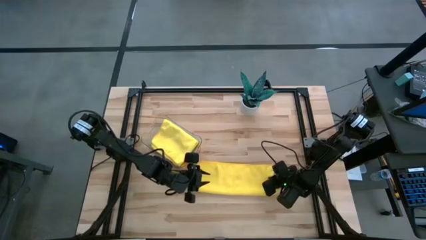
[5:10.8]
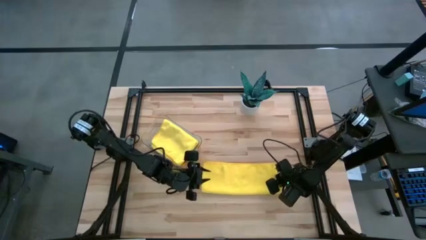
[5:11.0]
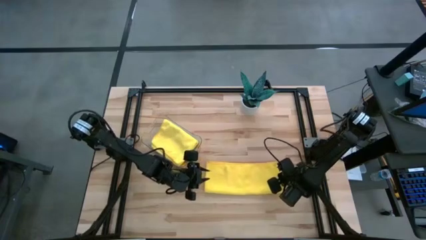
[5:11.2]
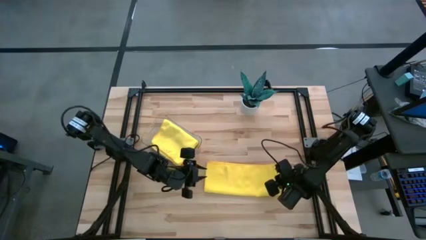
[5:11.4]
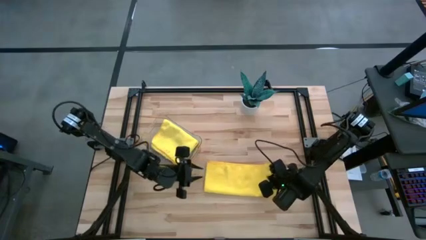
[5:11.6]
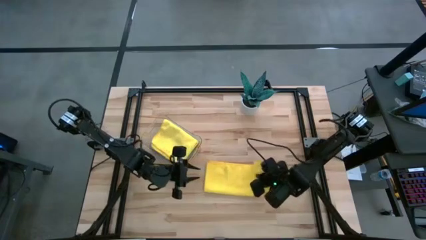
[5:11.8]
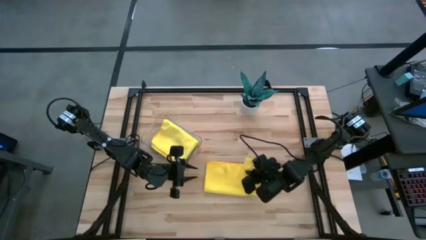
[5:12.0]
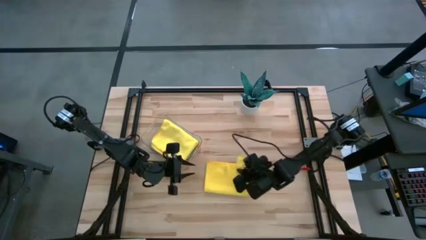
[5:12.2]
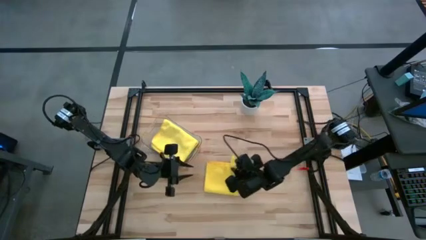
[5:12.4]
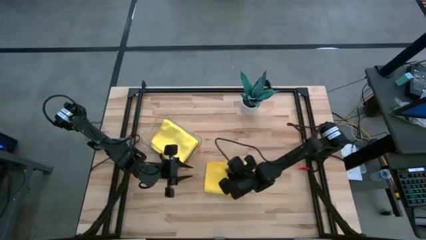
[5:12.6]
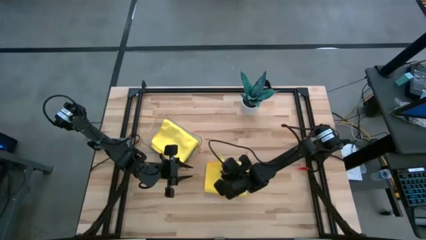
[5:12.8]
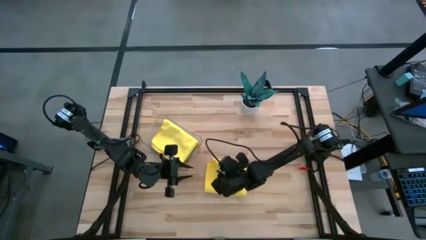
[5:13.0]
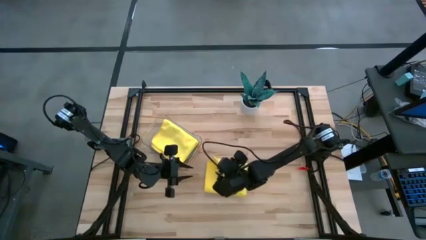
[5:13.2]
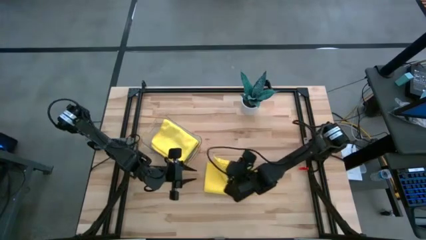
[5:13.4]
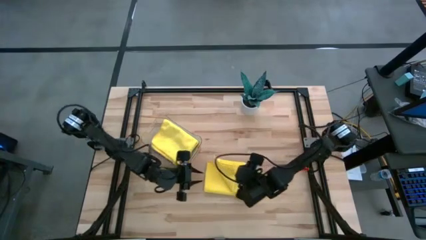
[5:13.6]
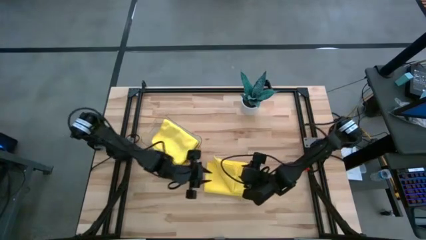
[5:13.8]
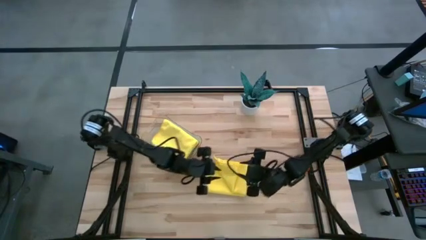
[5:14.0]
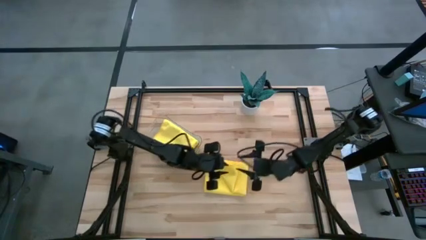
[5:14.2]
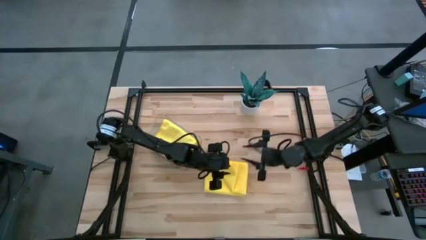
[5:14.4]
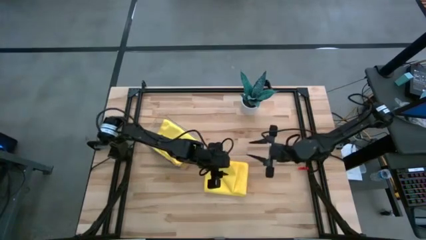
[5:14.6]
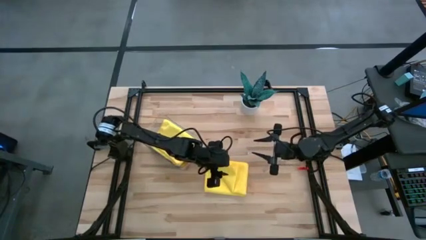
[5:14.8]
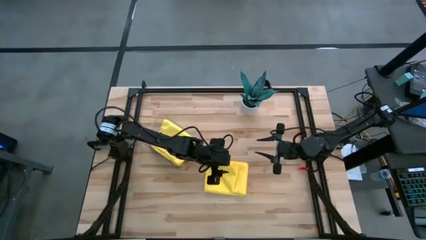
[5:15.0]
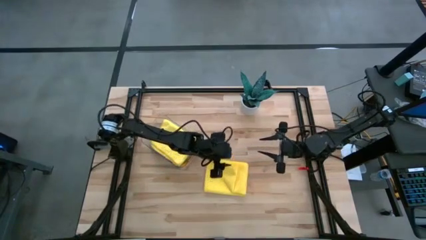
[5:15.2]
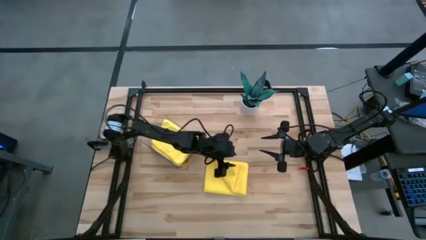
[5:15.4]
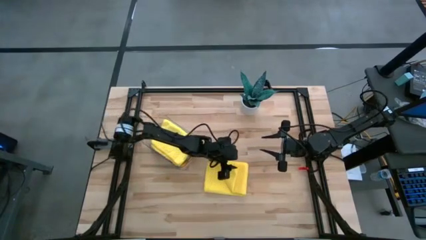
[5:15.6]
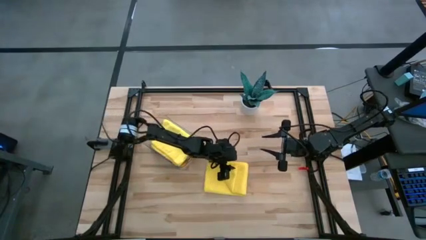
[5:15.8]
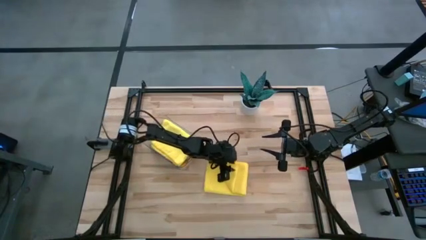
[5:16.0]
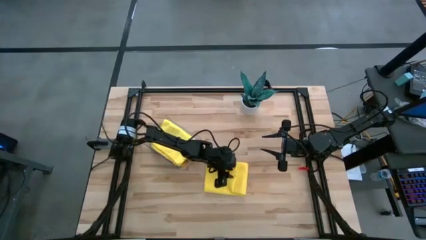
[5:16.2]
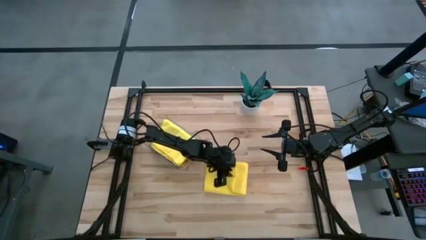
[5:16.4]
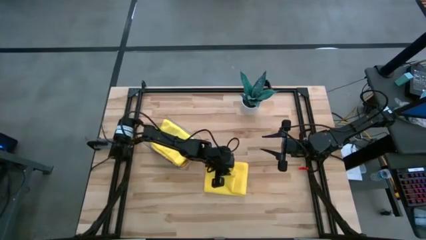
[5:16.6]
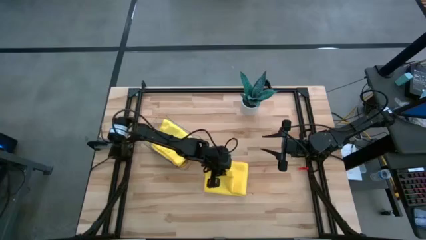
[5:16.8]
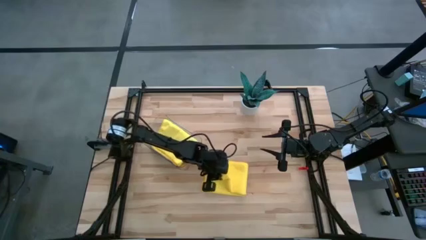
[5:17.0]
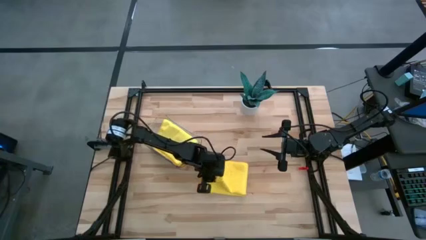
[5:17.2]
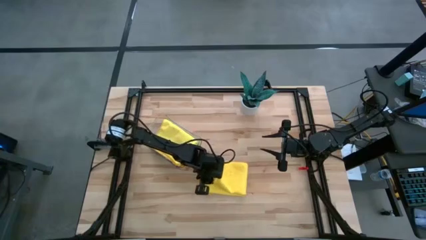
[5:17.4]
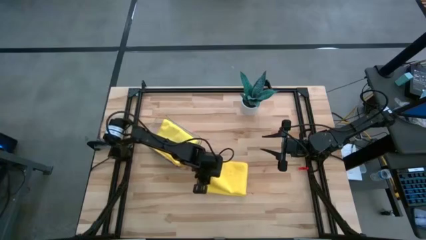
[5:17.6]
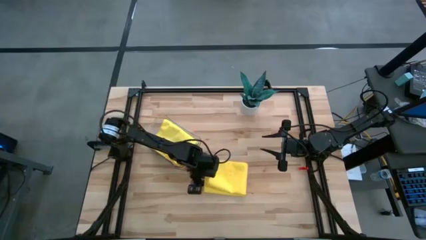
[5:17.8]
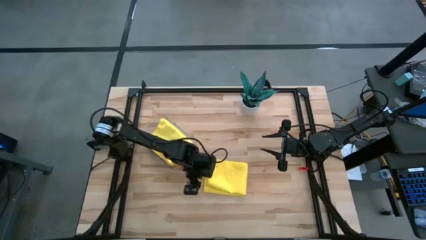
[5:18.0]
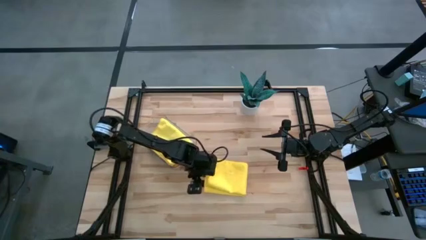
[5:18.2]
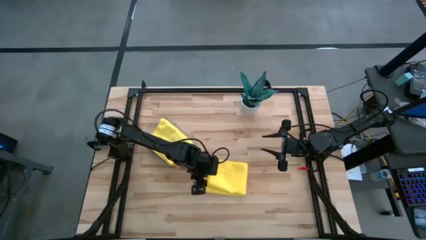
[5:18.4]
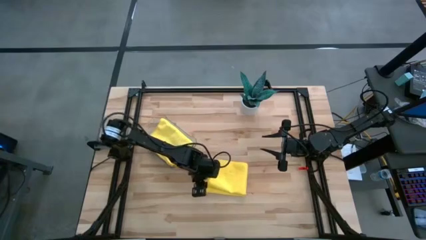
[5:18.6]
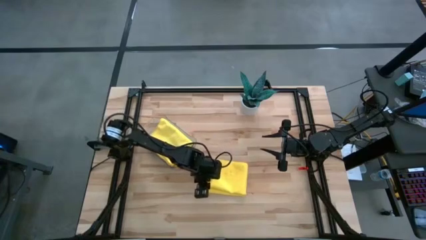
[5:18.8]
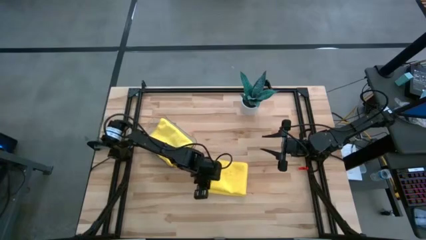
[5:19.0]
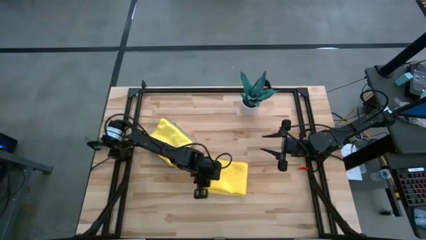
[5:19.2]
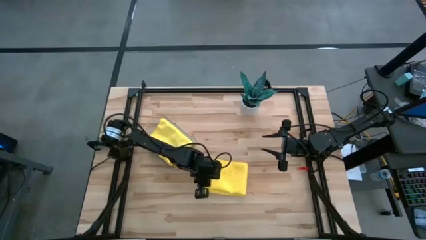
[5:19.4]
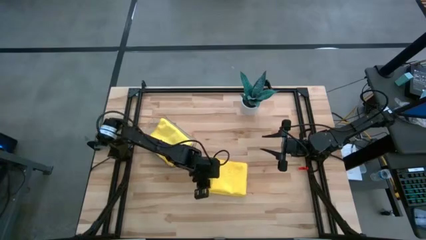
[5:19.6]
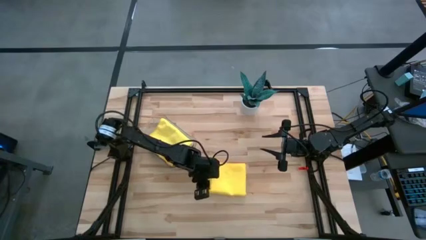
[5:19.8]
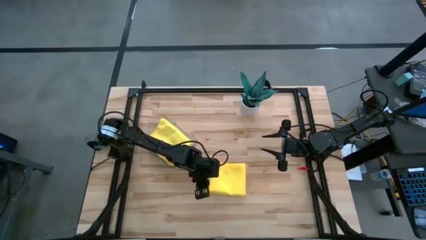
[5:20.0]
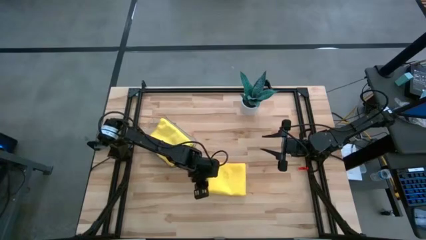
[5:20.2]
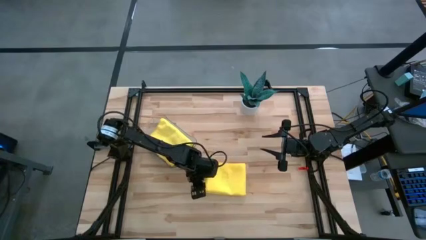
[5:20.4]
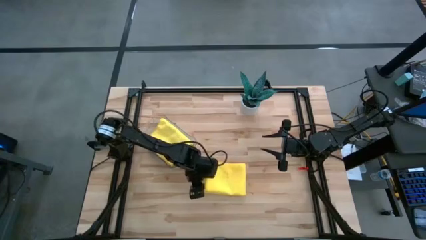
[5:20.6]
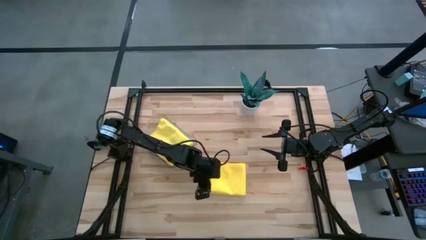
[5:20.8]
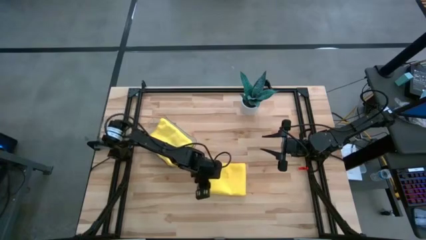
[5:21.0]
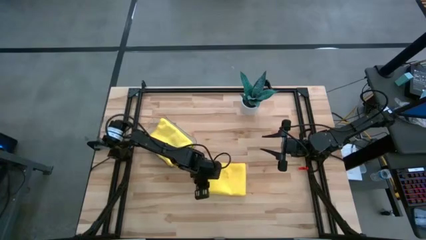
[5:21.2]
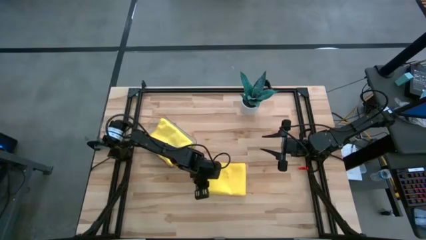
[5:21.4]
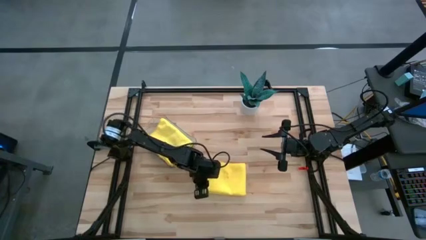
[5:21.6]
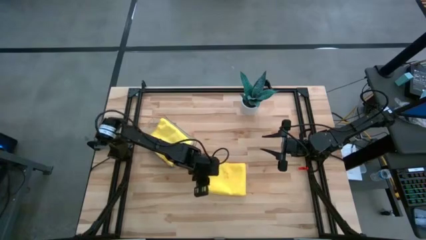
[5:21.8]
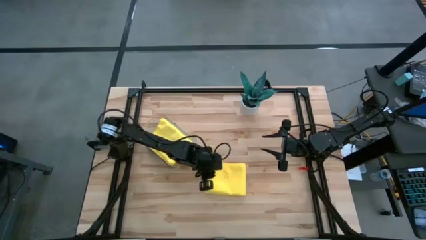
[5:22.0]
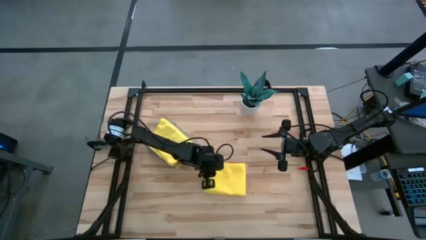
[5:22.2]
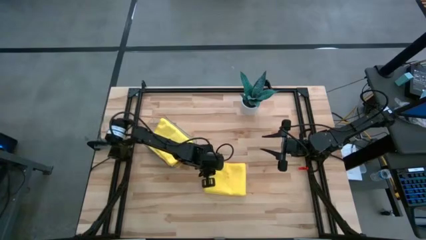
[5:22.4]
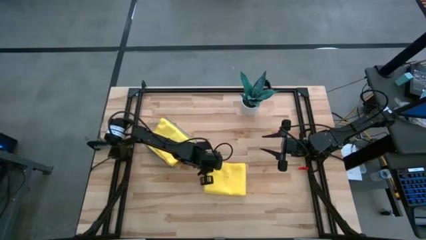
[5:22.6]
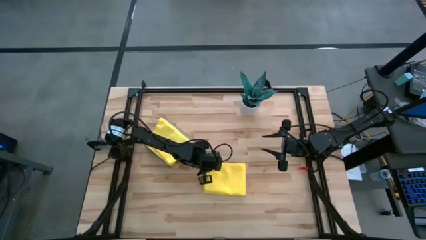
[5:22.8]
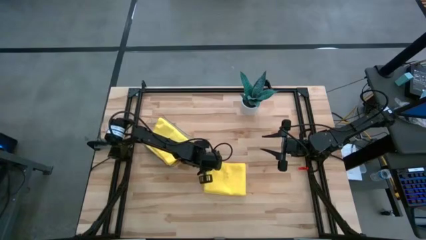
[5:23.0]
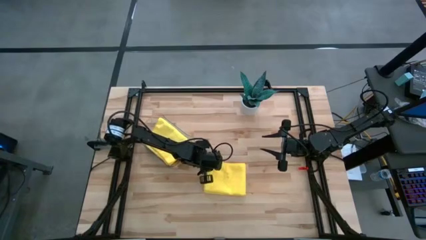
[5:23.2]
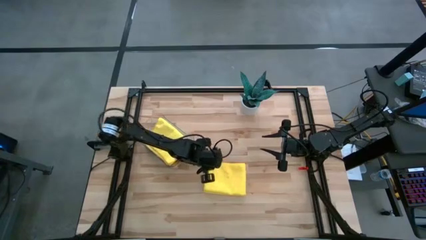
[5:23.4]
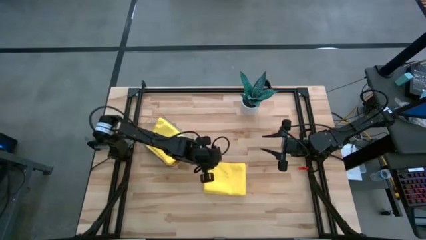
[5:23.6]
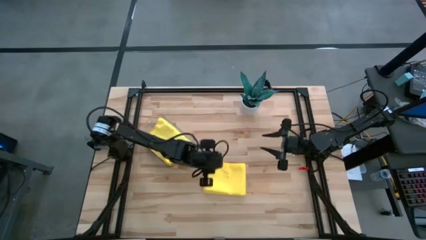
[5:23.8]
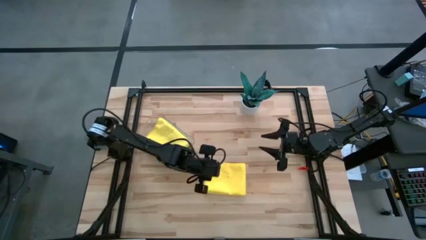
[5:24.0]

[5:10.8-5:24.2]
Task: Fold microfiber towels
Fold the yellow microfiber cloth
